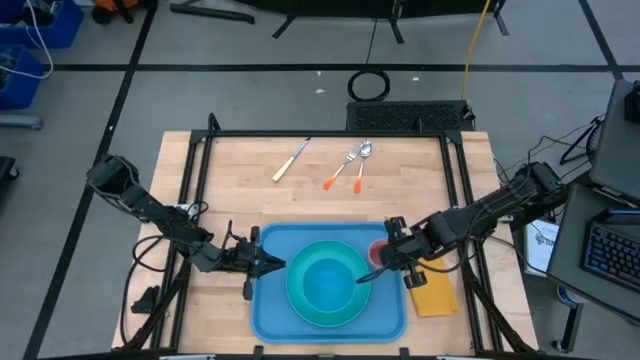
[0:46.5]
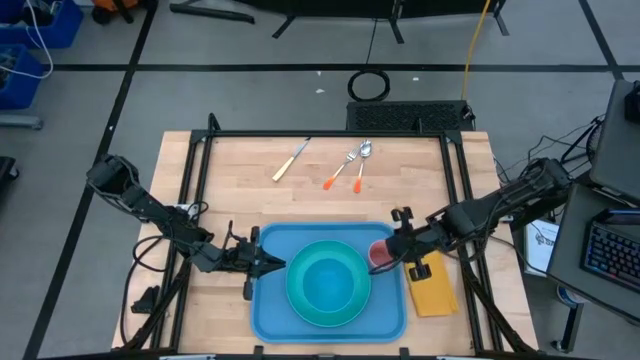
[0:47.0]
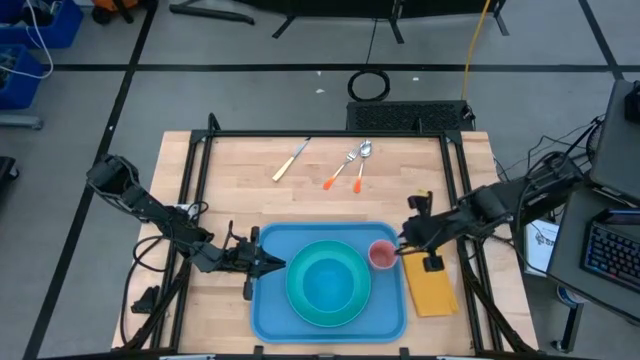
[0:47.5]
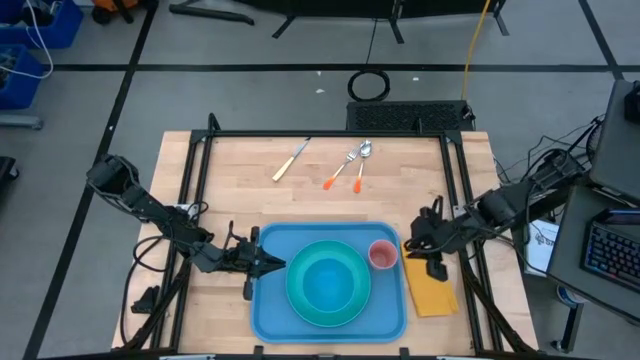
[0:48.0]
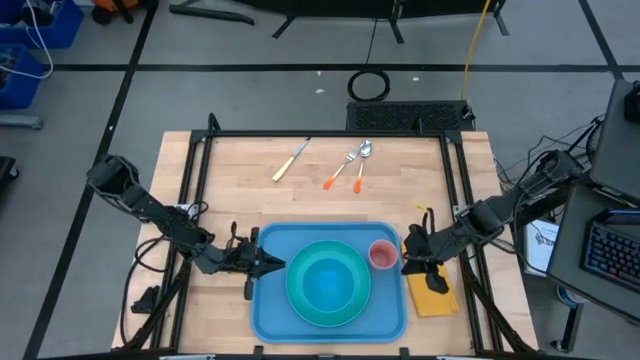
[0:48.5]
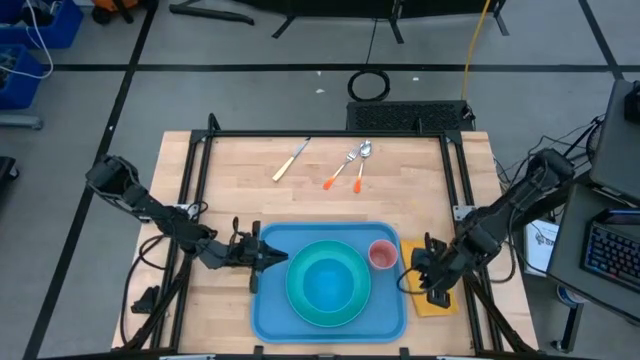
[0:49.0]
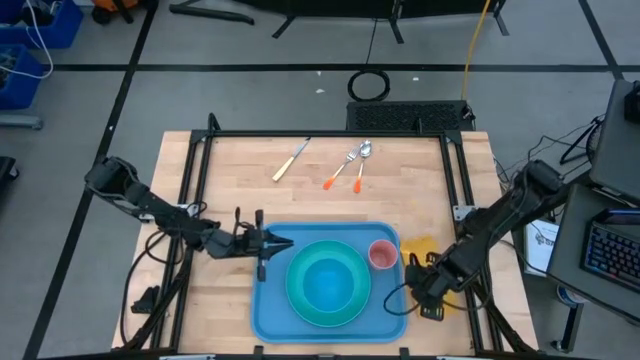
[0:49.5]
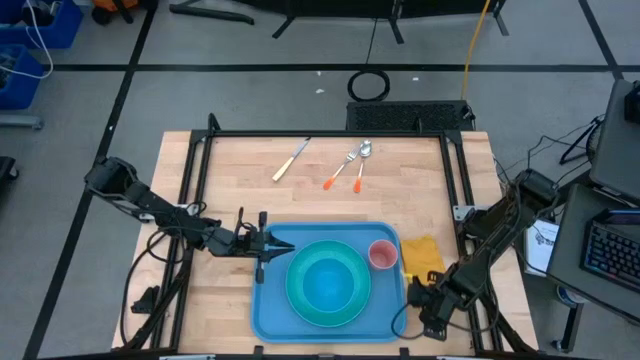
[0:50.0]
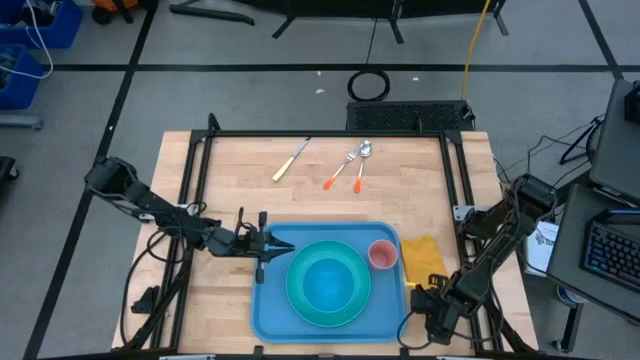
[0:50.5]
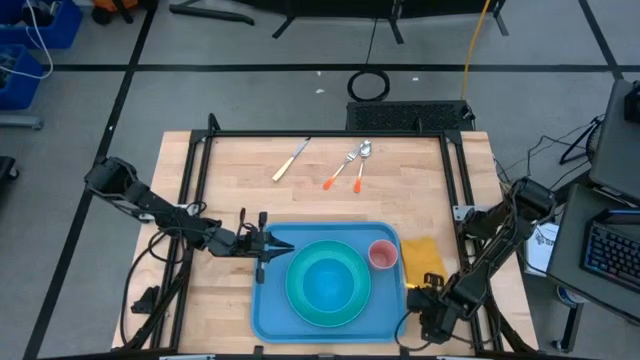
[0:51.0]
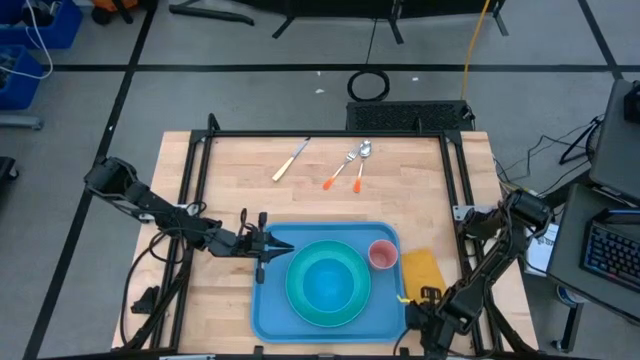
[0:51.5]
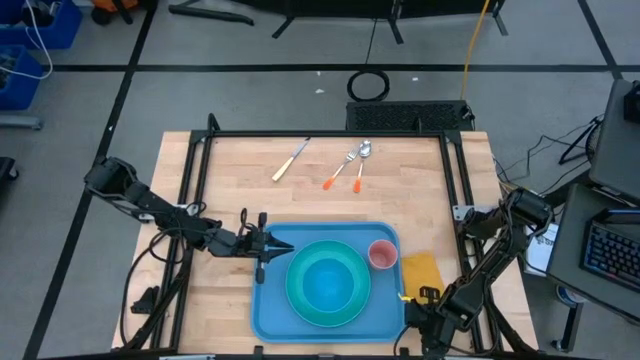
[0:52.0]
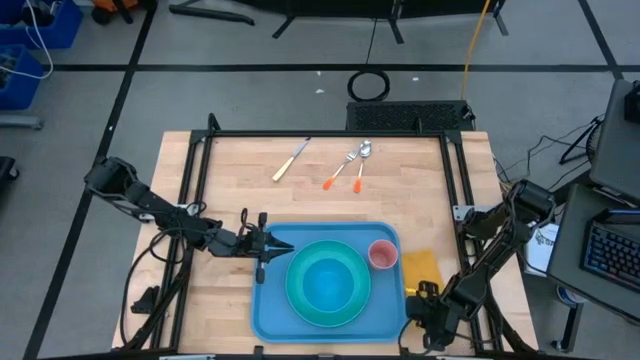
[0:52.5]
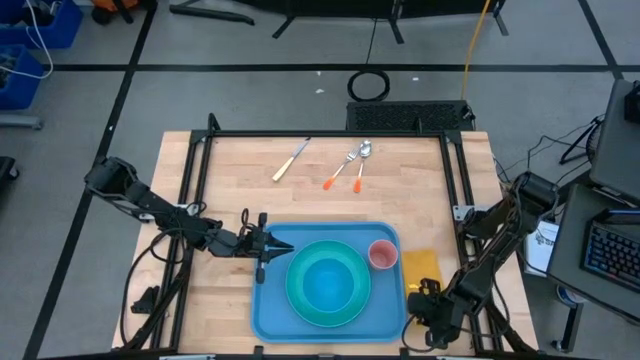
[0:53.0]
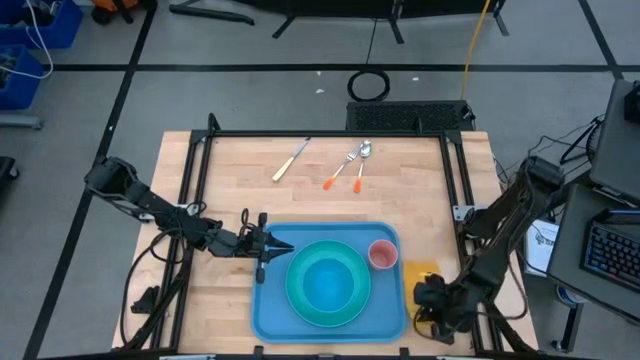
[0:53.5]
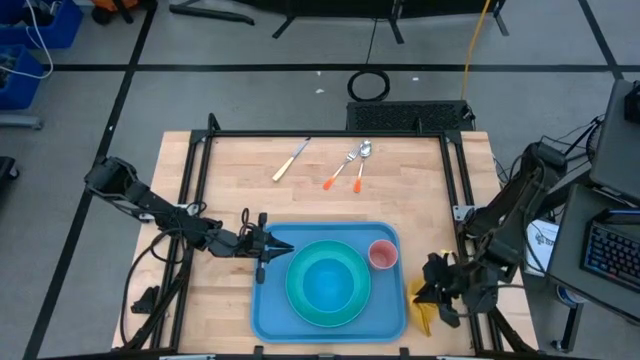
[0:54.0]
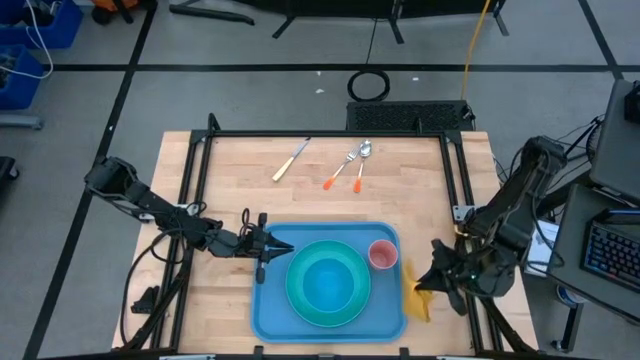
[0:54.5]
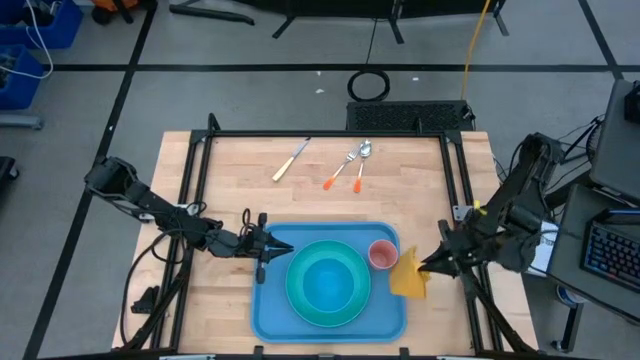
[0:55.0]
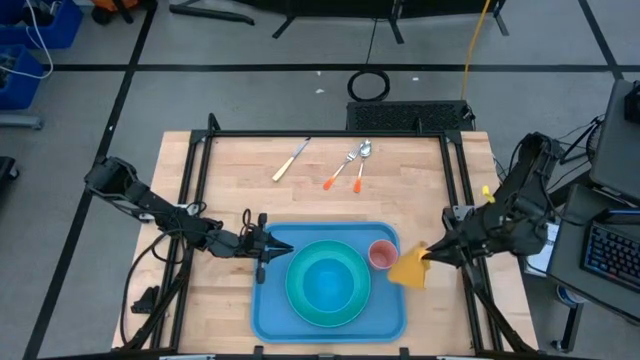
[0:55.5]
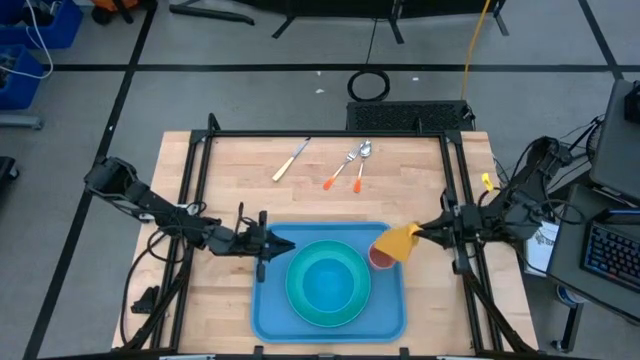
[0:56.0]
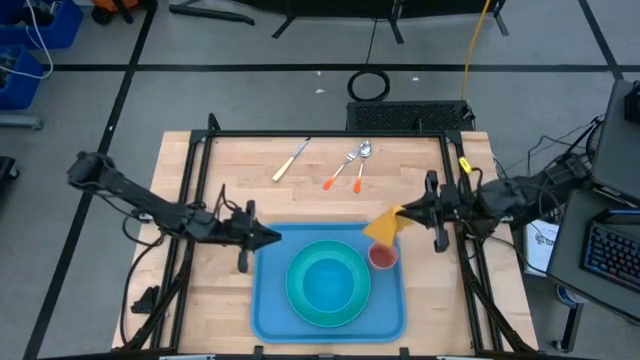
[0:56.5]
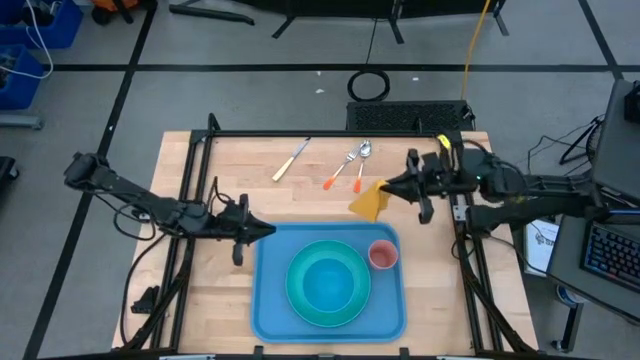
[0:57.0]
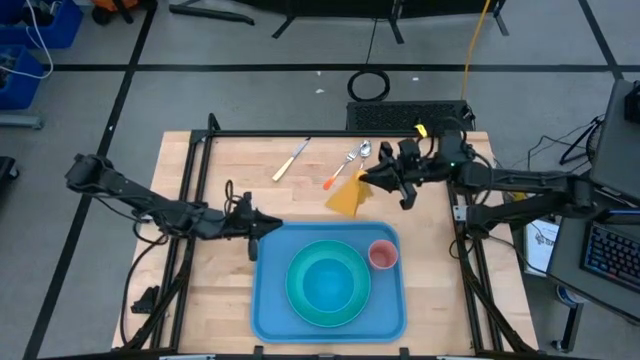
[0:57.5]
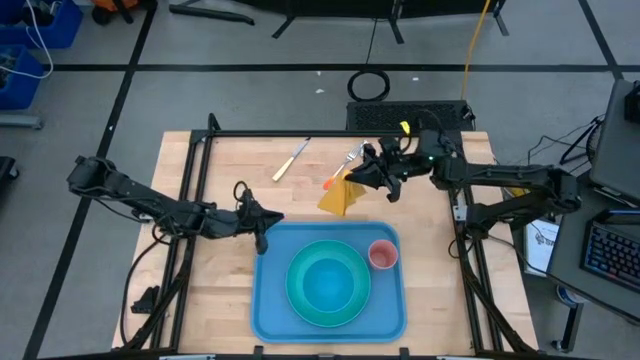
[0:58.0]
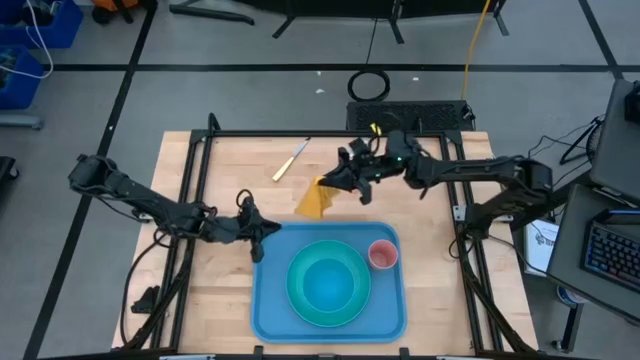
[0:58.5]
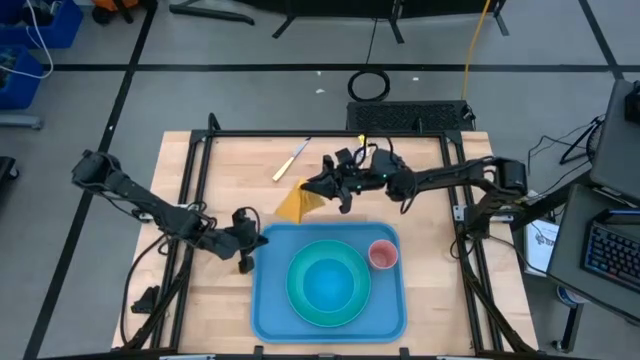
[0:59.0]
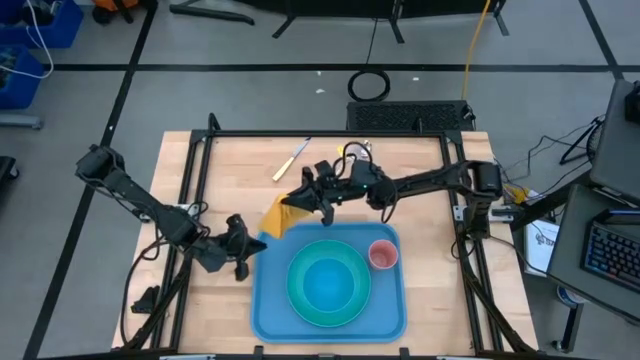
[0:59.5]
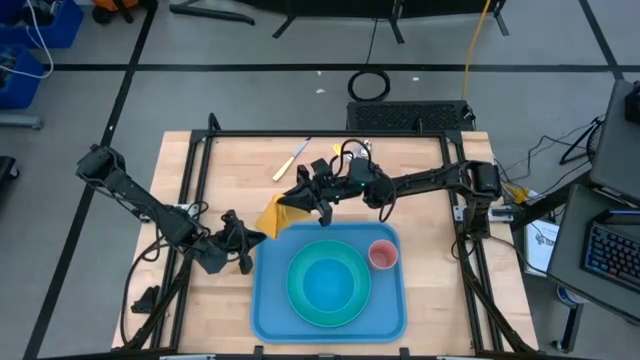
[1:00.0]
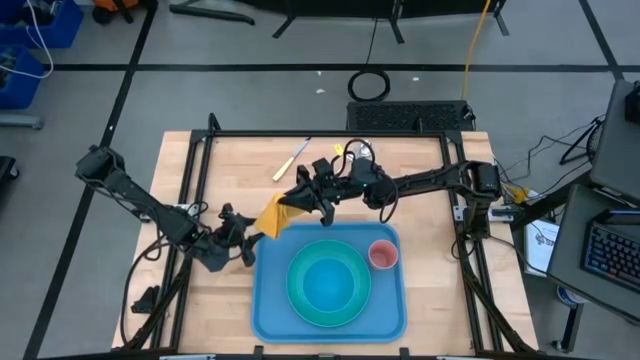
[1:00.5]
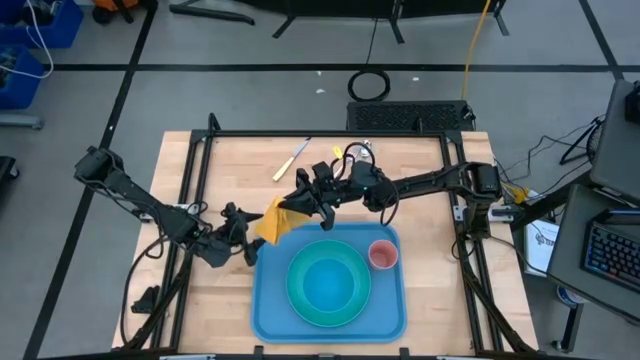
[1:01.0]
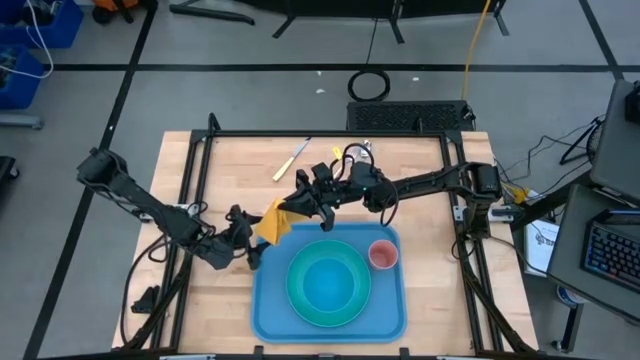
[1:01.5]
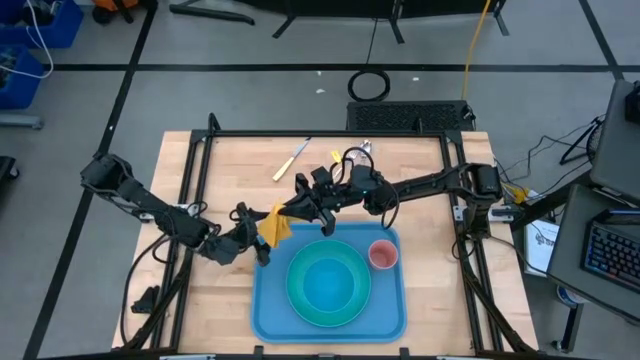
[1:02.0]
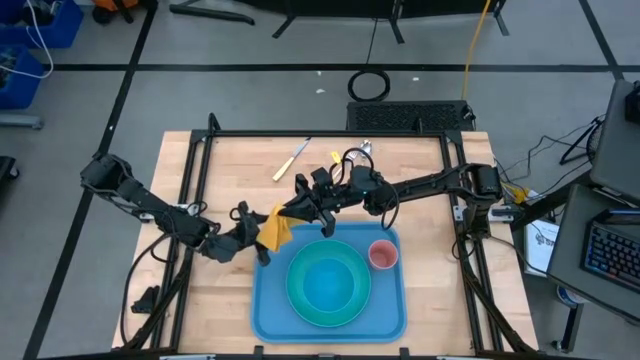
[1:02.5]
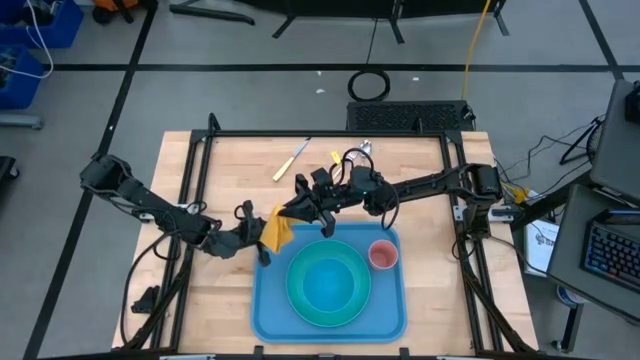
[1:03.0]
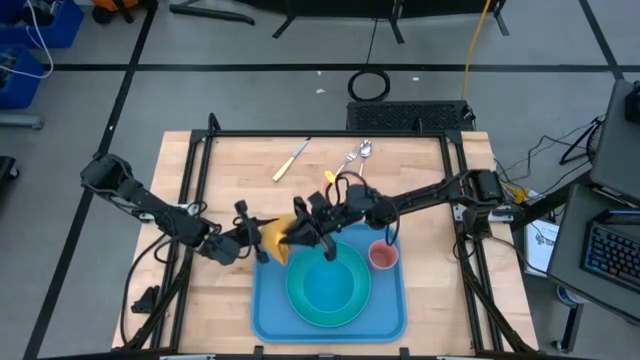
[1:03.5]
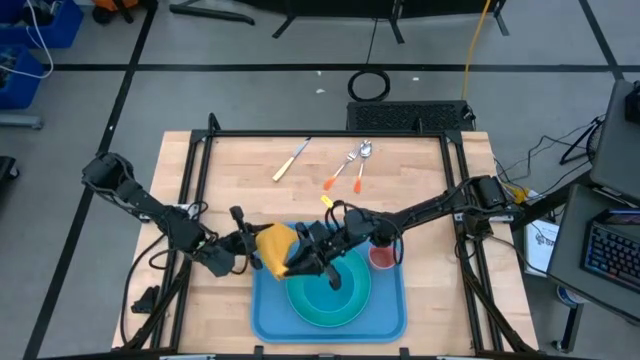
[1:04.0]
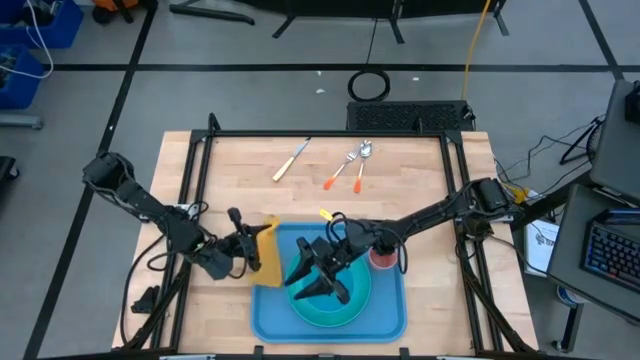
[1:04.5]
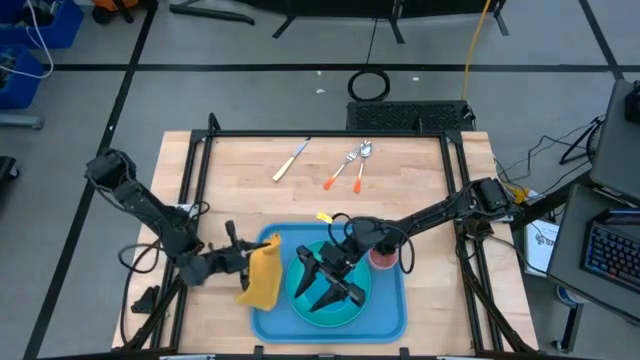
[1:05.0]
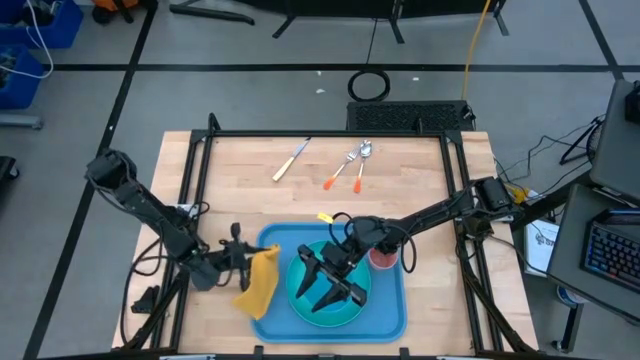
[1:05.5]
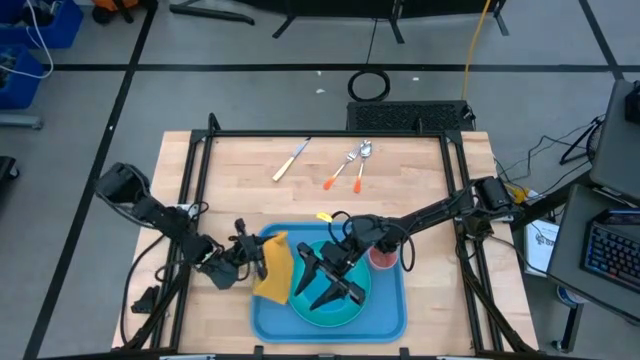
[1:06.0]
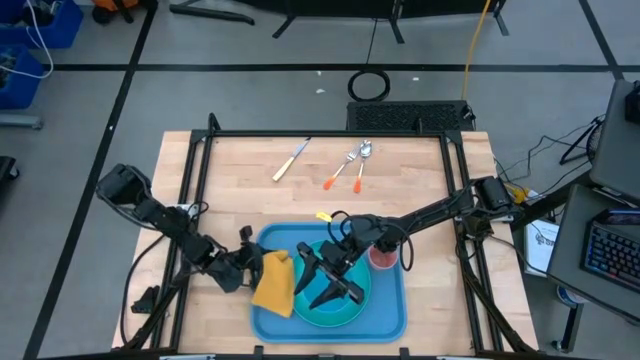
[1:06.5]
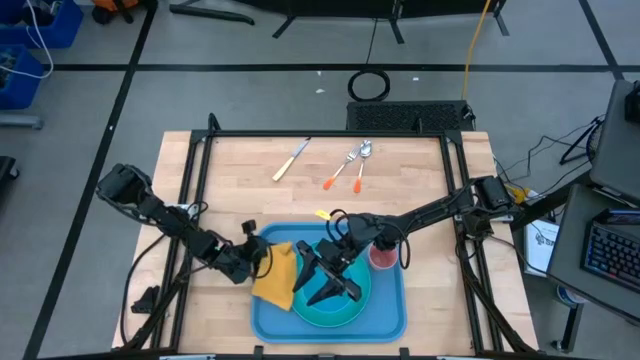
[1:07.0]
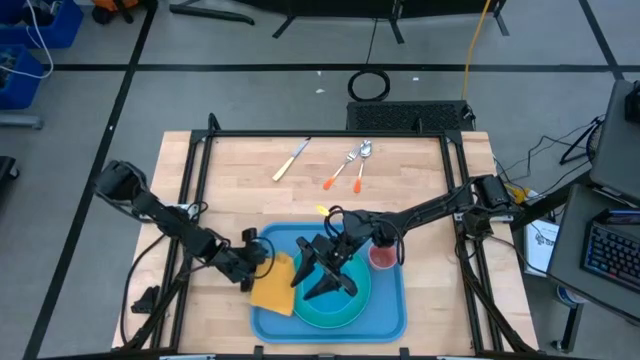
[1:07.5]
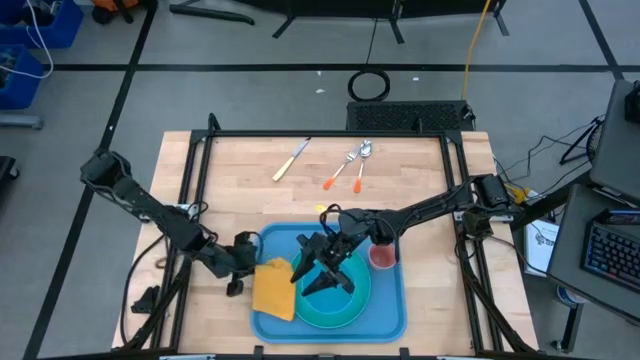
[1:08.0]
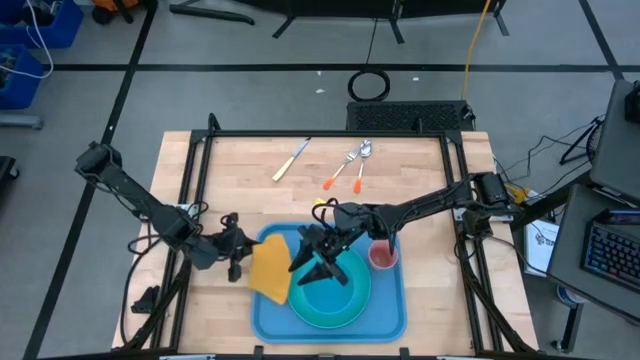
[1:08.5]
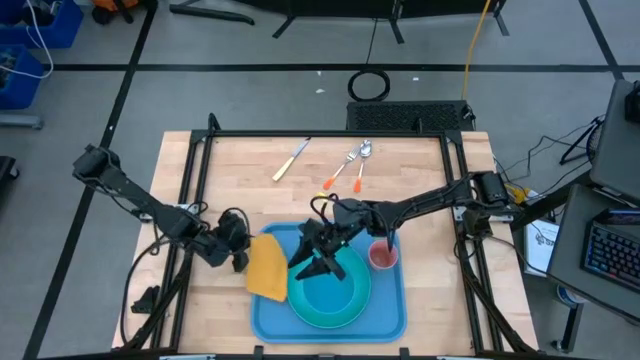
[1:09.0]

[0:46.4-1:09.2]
Task: Set up tray
Put the yellow table napkin on the blue tray to the left of the light blue plate
